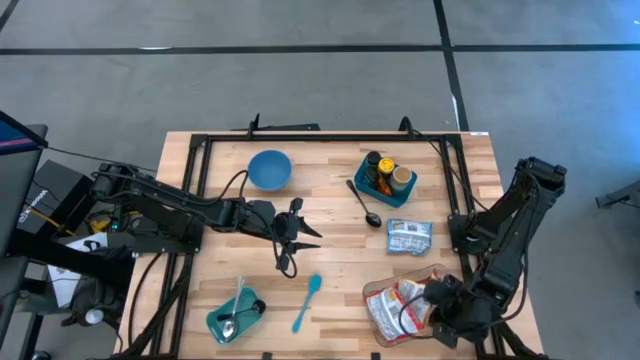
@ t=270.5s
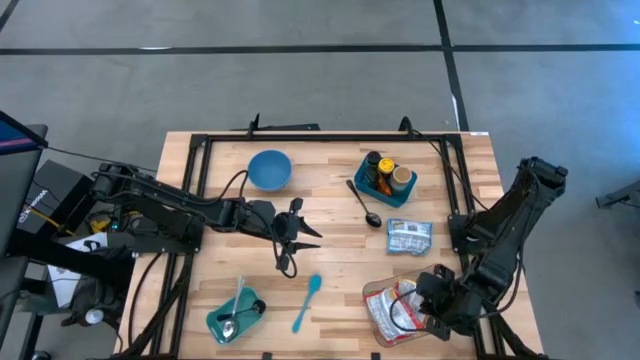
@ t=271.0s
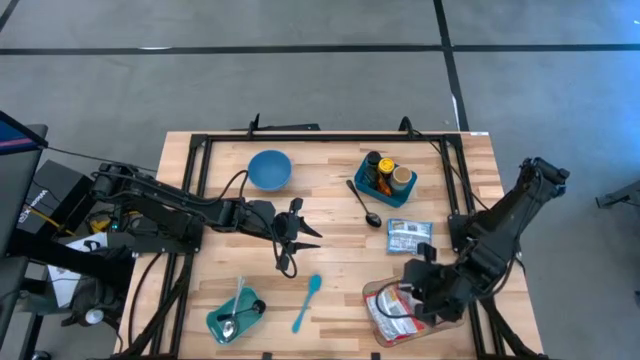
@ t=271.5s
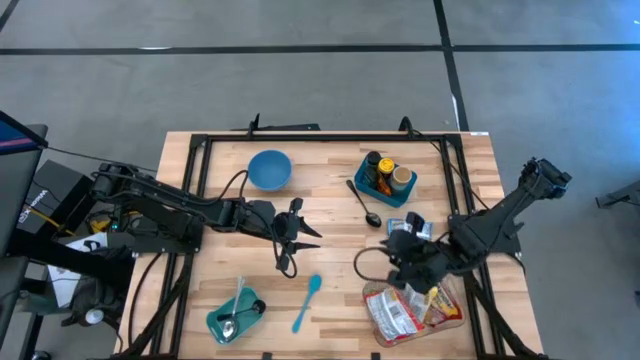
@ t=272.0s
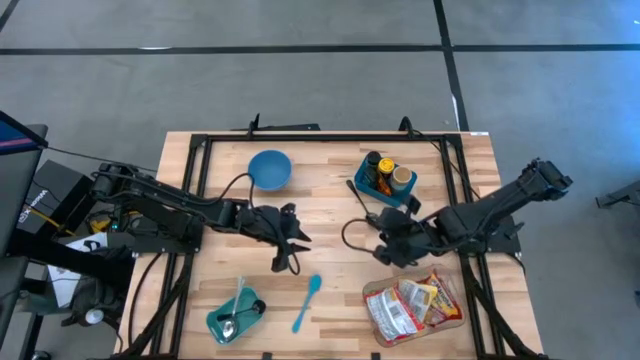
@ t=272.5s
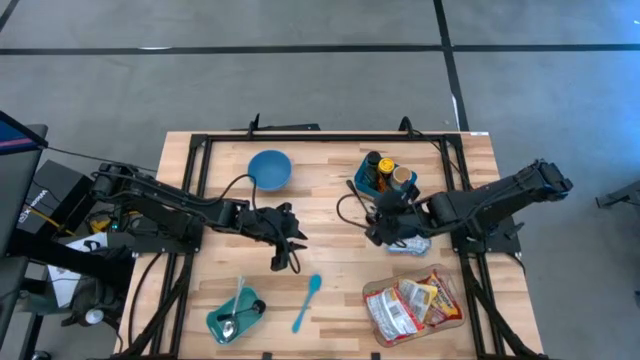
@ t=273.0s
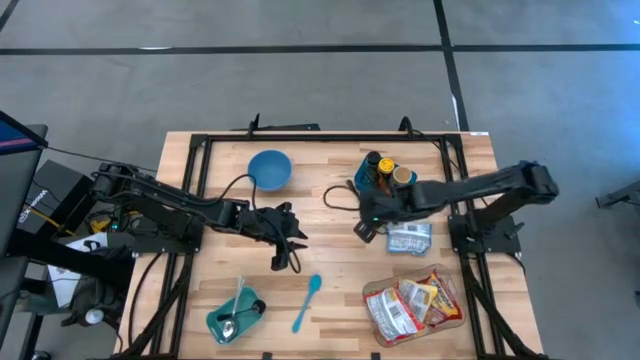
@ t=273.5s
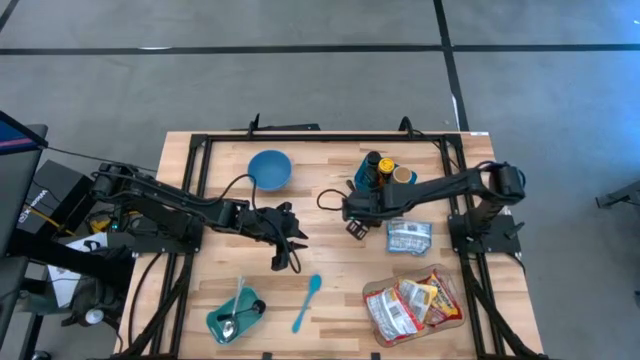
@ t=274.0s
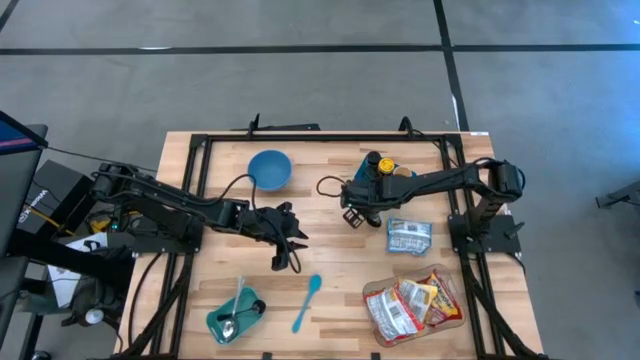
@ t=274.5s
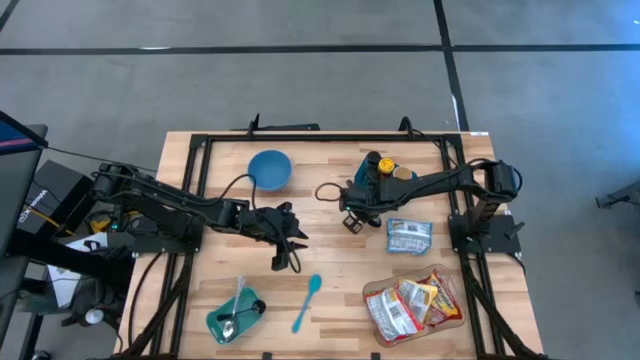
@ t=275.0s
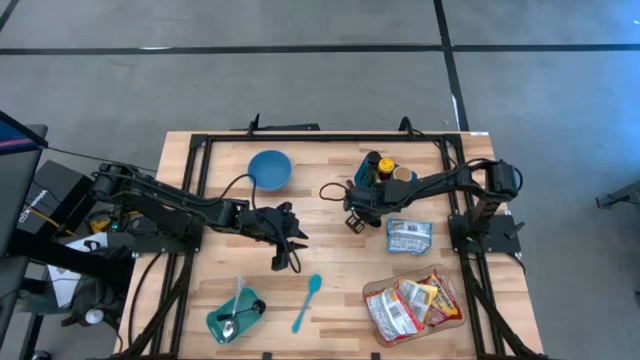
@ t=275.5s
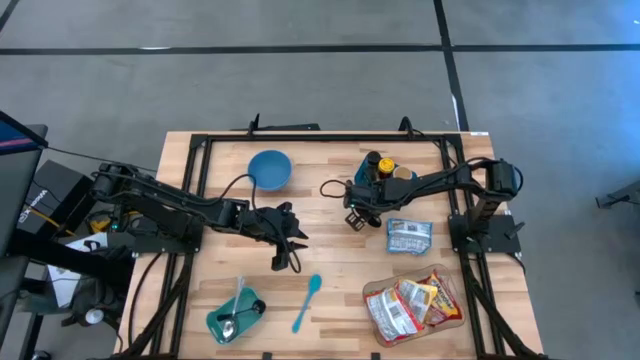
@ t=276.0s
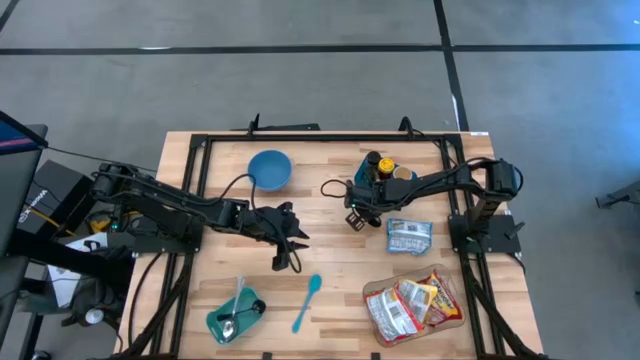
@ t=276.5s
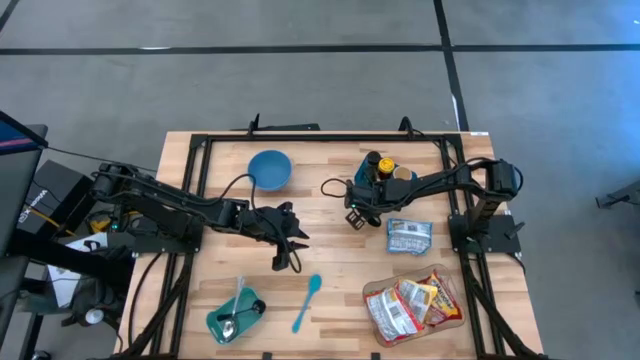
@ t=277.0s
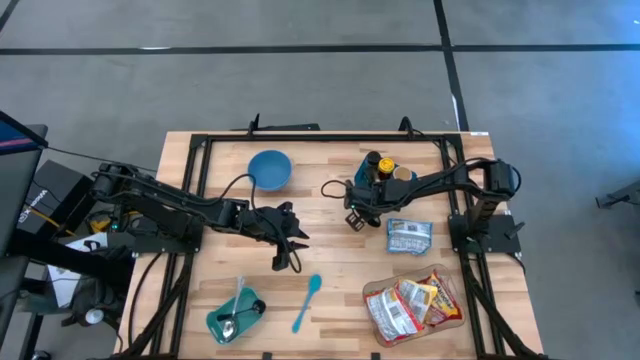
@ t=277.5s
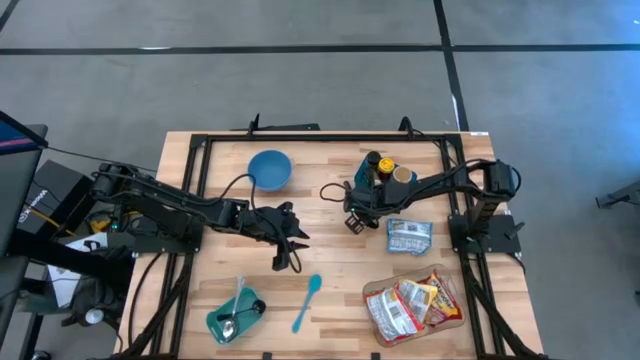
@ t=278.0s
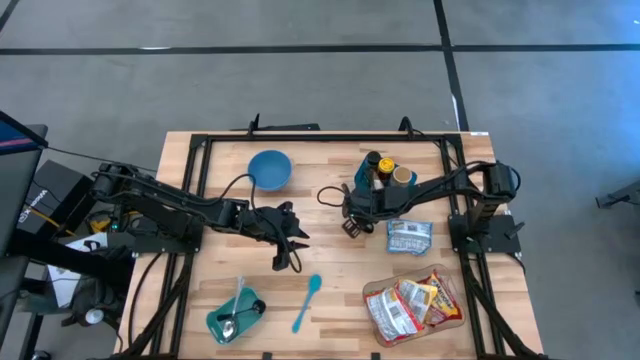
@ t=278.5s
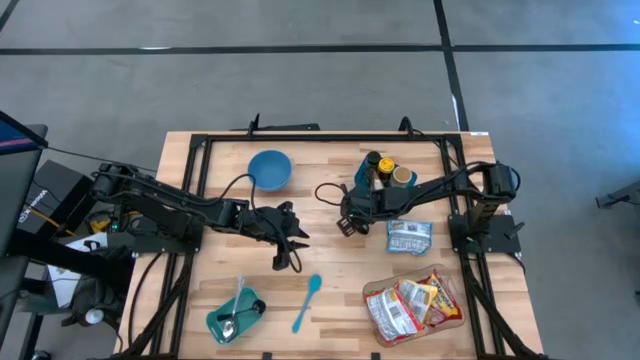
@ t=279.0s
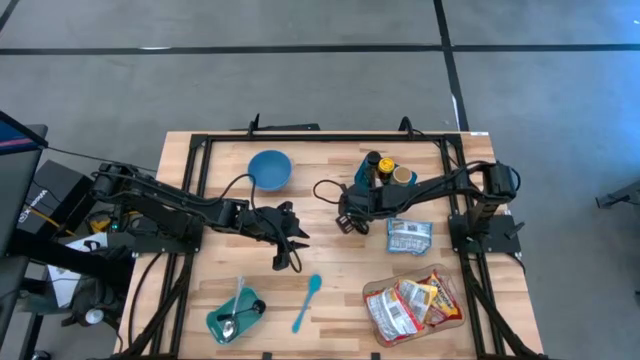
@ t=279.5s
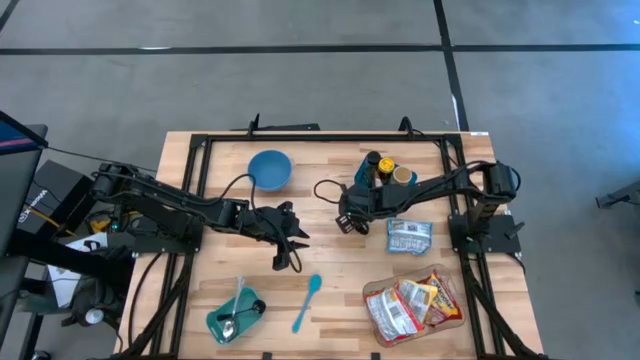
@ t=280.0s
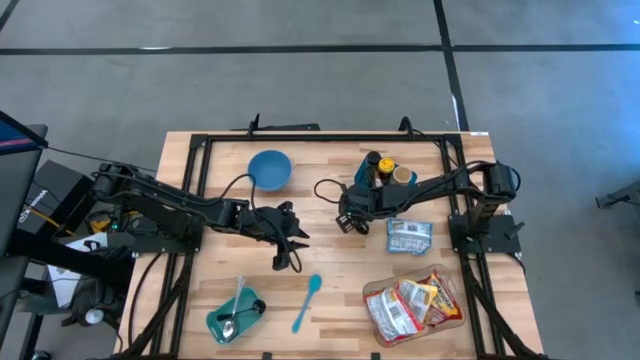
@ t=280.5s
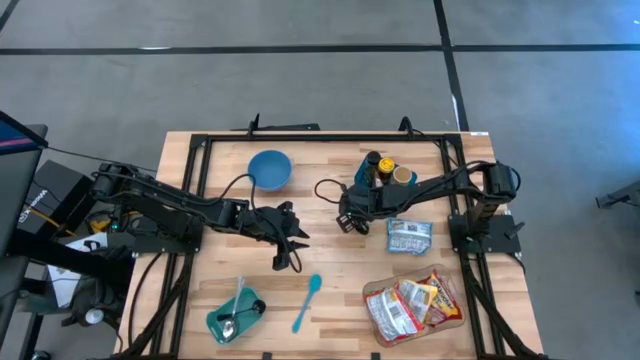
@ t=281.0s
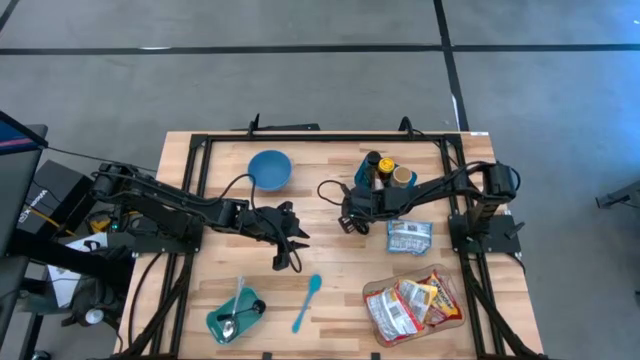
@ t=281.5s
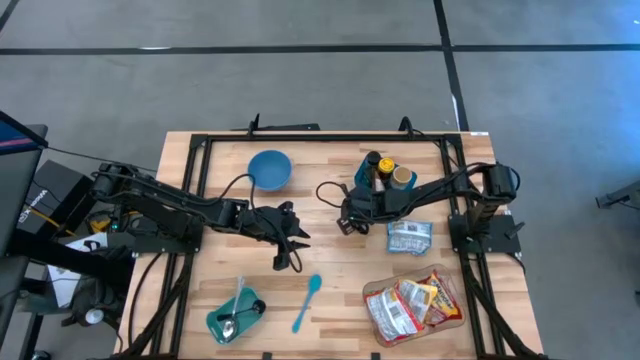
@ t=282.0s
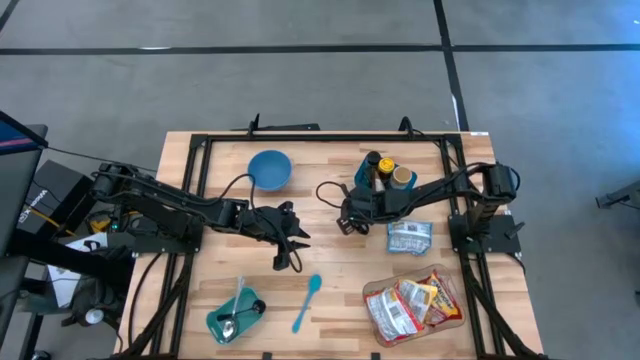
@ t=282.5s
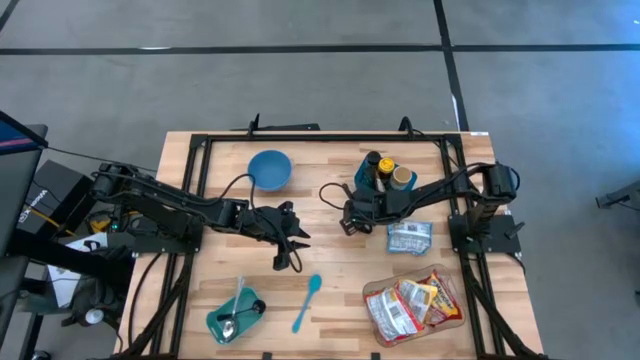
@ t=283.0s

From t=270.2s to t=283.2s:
Task: Pick & Place Food Item
Put the black spoon into the green bin

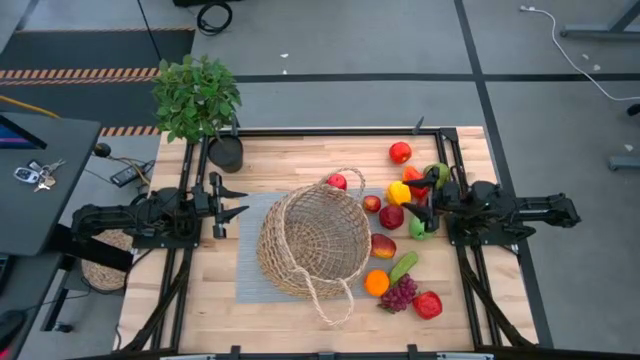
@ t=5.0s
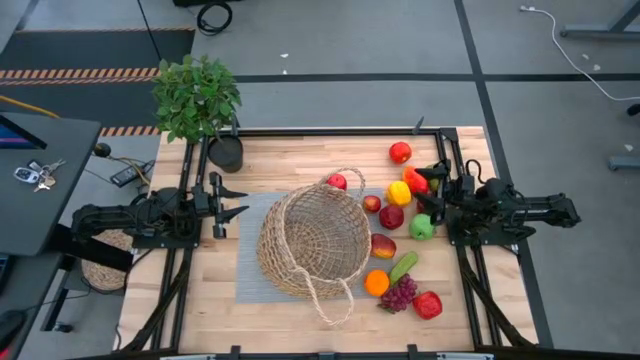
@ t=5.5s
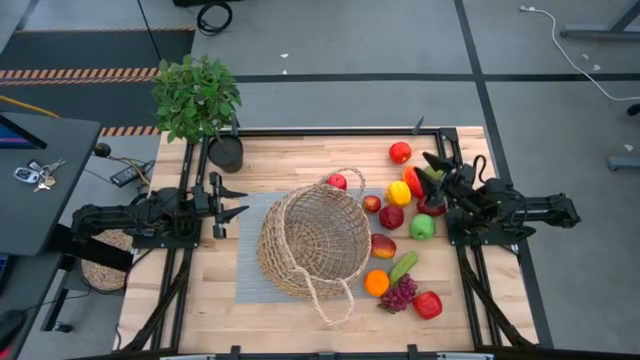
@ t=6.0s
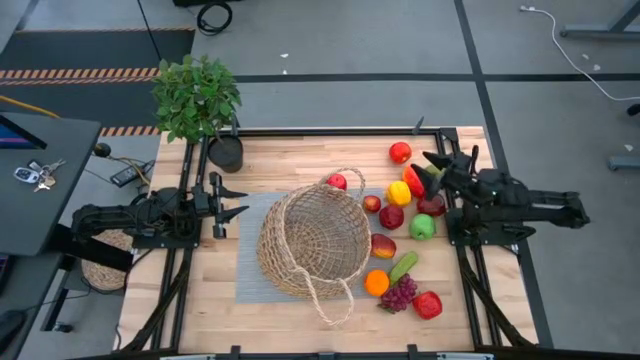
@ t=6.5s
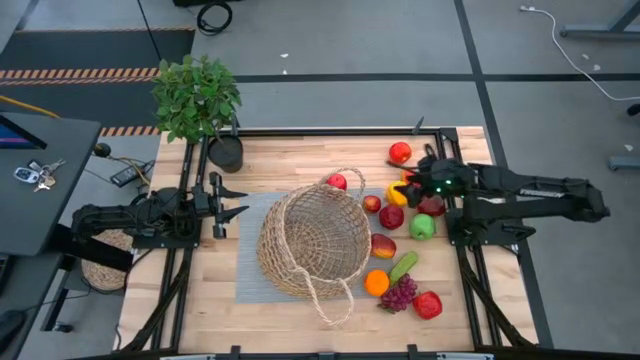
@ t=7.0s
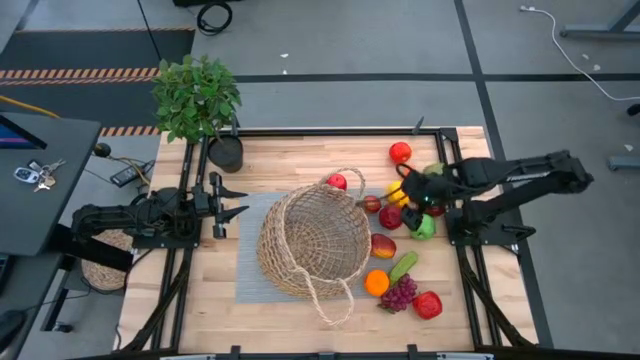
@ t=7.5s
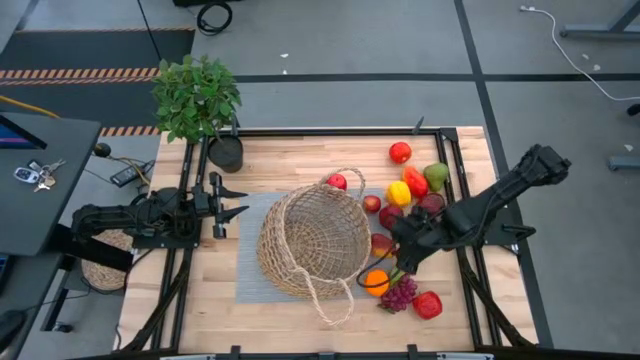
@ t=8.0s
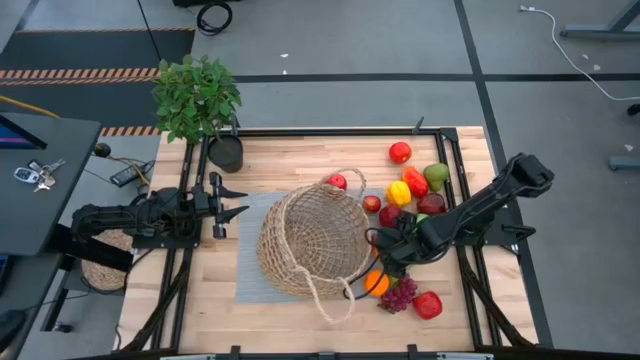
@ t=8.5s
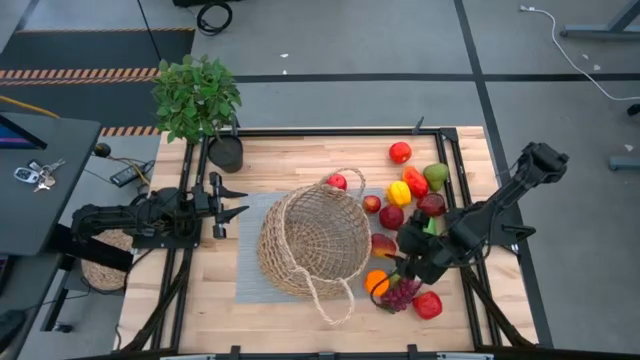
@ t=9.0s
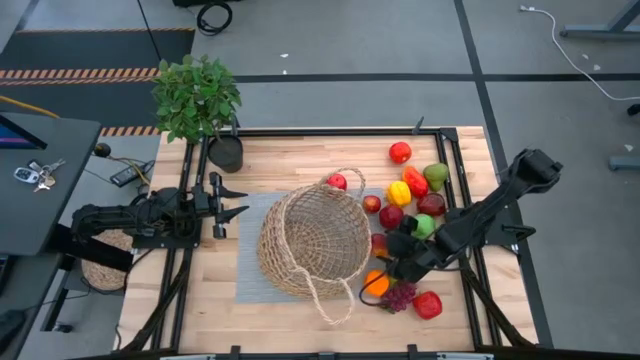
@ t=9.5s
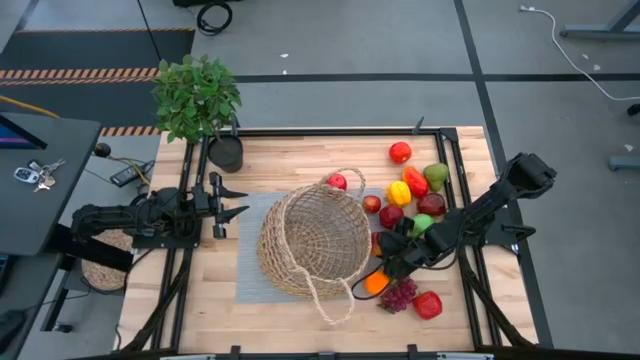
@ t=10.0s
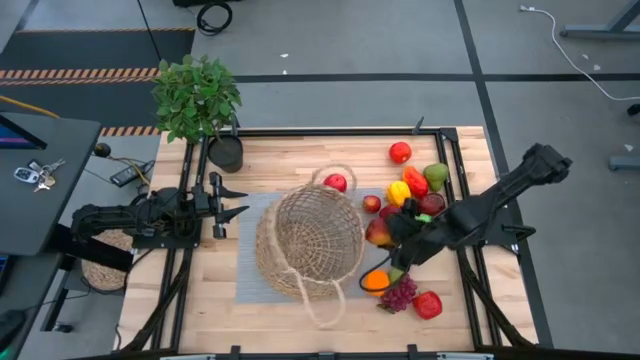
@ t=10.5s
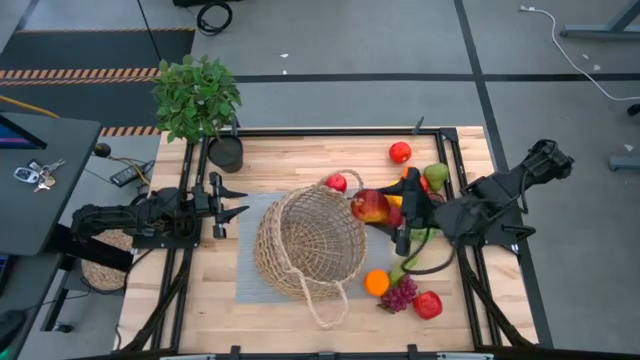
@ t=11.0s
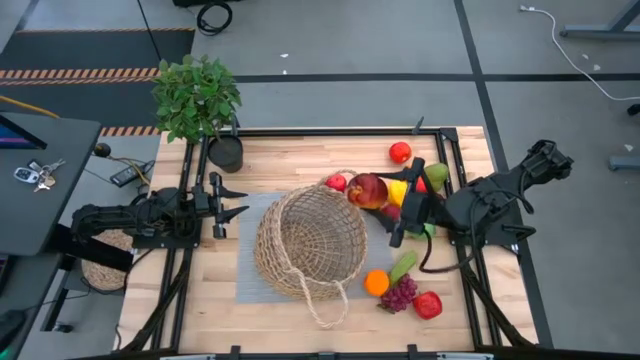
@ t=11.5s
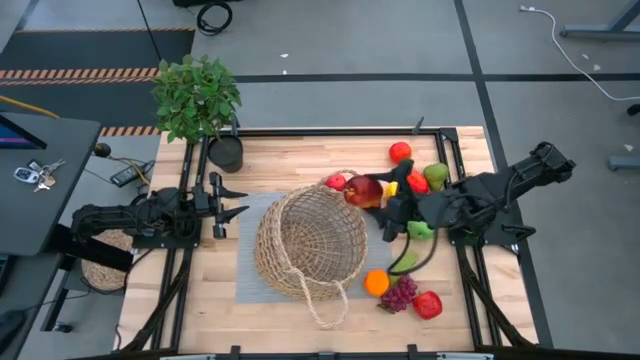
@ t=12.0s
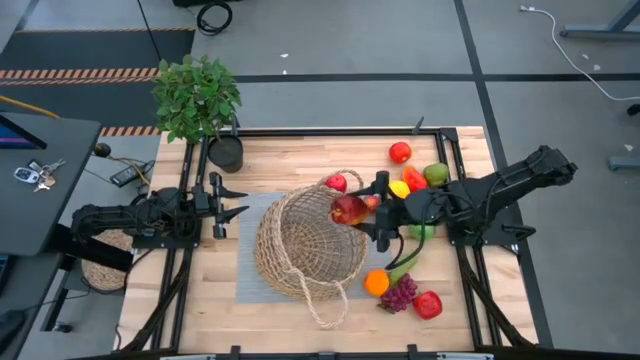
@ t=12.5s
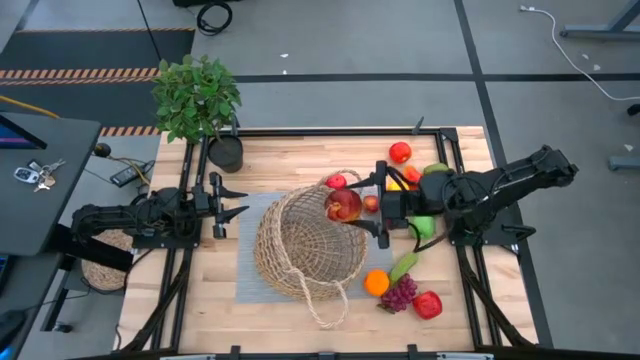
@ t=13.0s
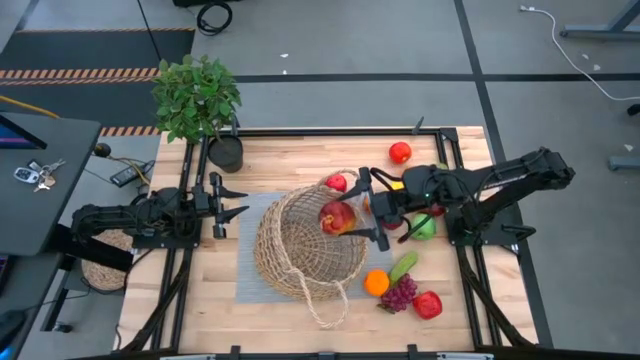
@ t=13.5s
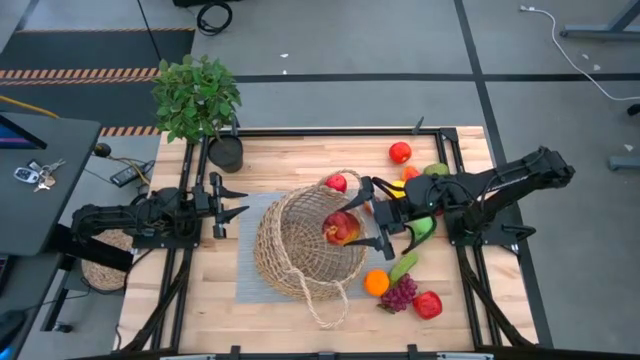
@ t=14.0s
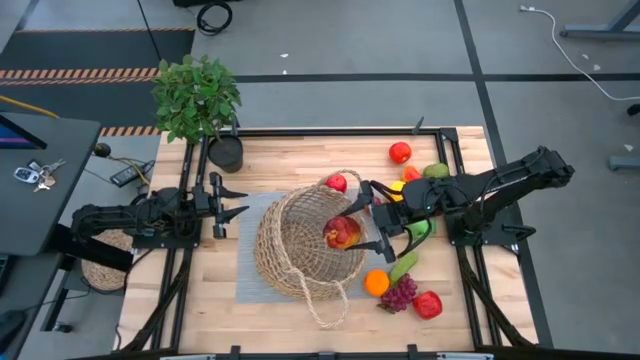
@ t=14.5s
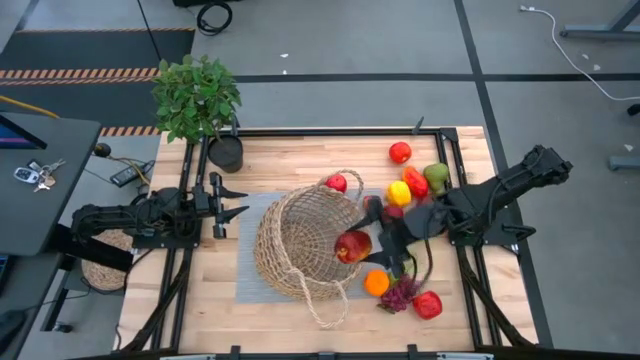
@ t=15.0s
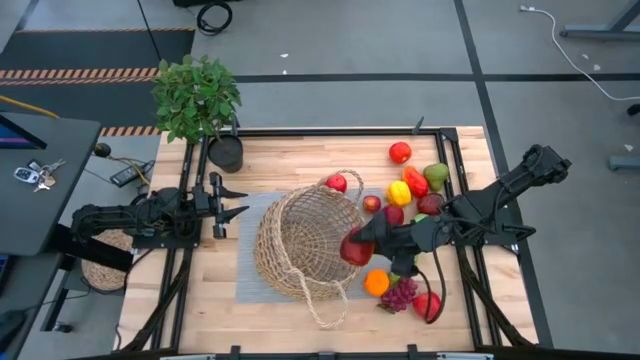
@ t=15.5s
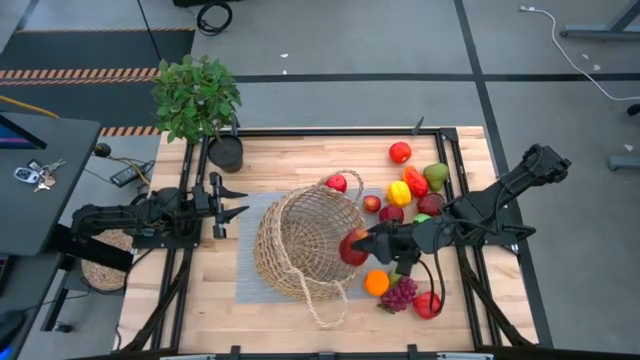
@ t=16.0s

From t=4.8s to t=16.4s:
Task: Build produce basket
Put the red apple into the brown basket
